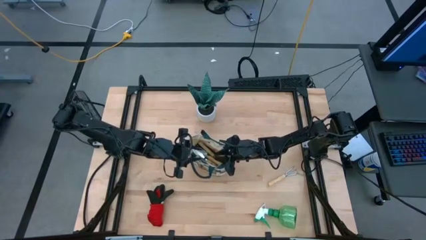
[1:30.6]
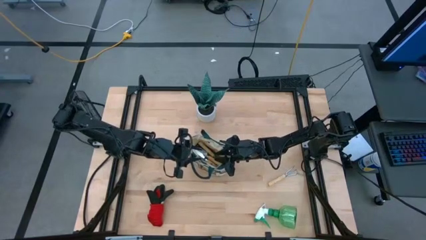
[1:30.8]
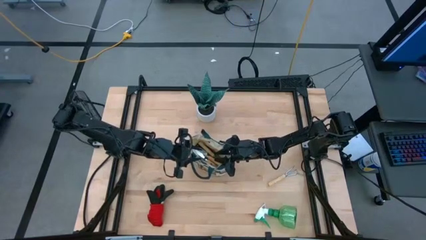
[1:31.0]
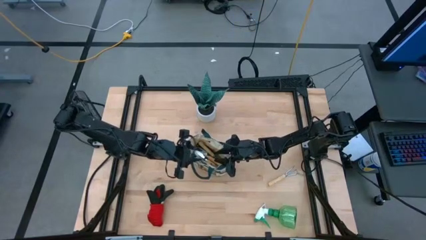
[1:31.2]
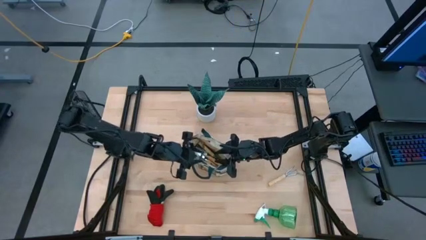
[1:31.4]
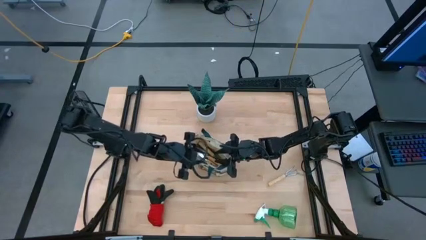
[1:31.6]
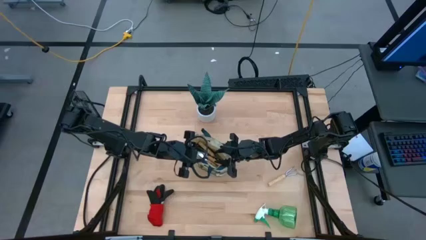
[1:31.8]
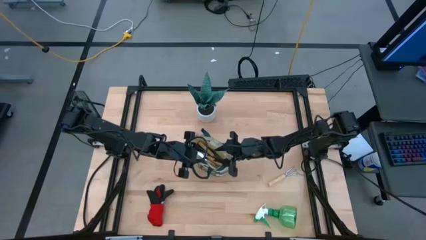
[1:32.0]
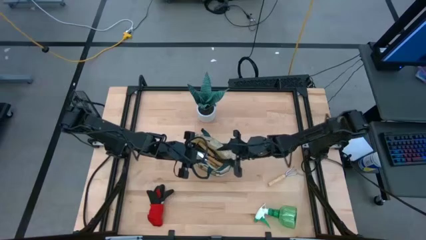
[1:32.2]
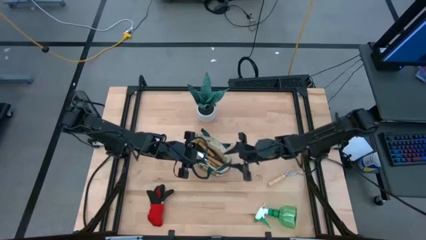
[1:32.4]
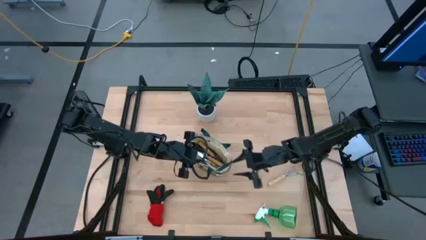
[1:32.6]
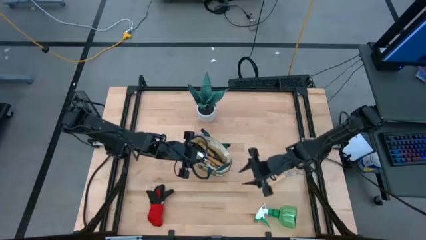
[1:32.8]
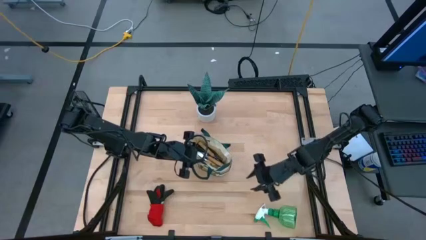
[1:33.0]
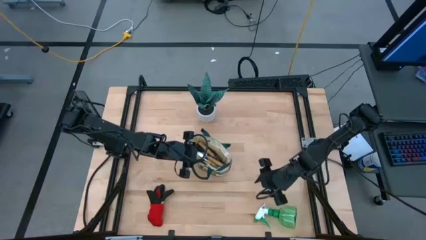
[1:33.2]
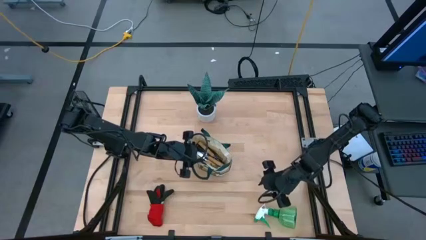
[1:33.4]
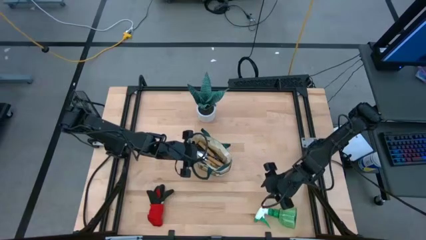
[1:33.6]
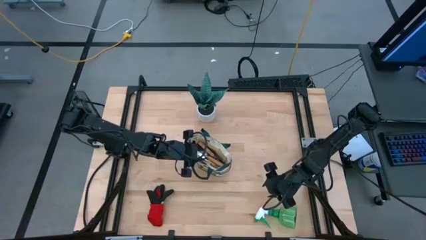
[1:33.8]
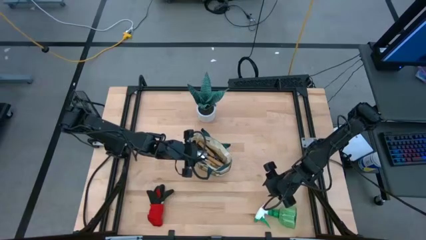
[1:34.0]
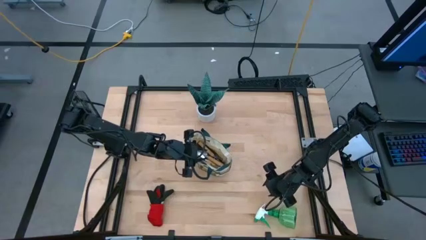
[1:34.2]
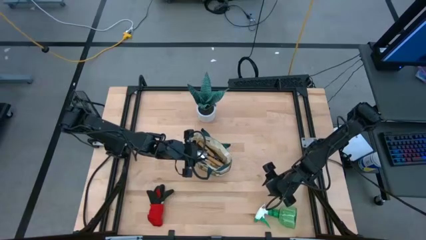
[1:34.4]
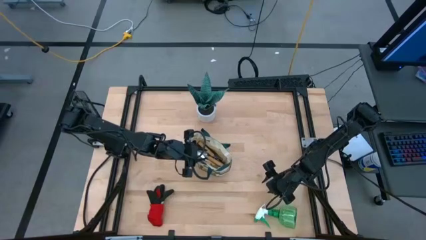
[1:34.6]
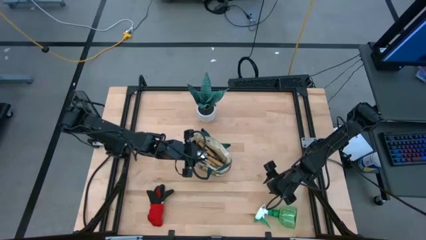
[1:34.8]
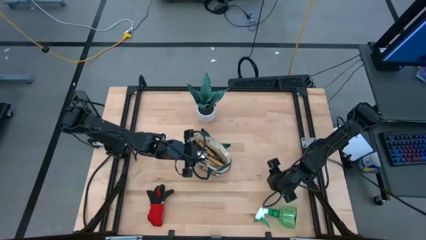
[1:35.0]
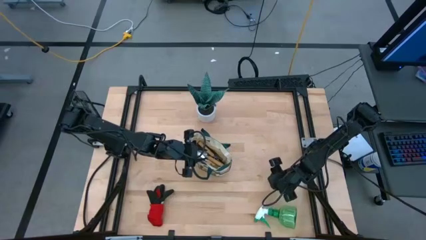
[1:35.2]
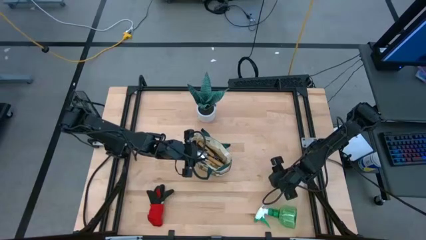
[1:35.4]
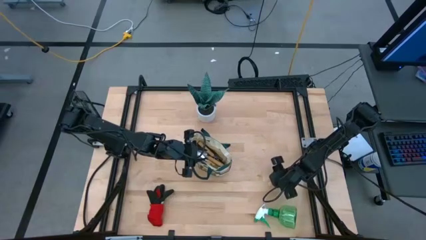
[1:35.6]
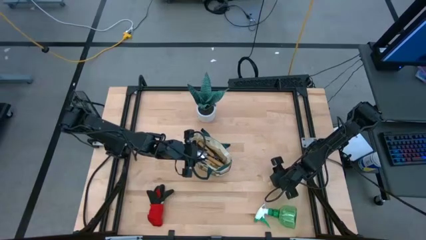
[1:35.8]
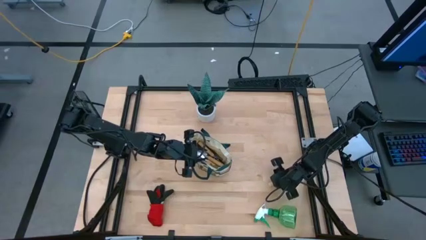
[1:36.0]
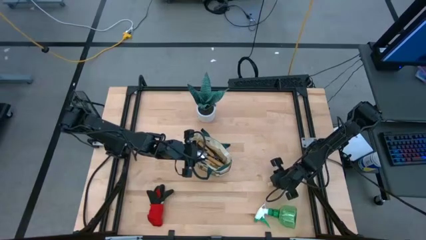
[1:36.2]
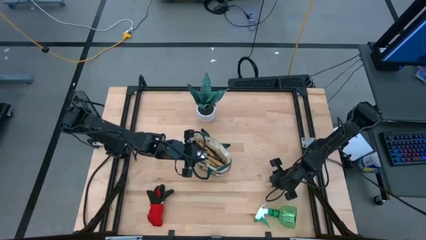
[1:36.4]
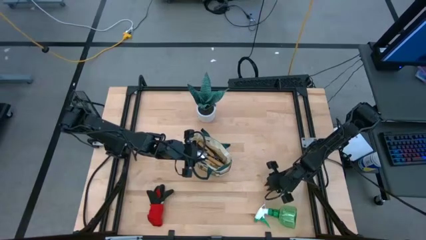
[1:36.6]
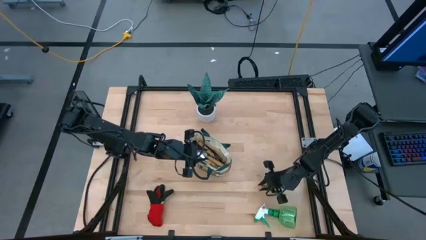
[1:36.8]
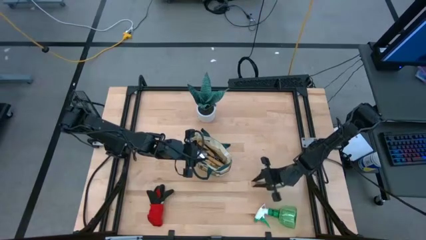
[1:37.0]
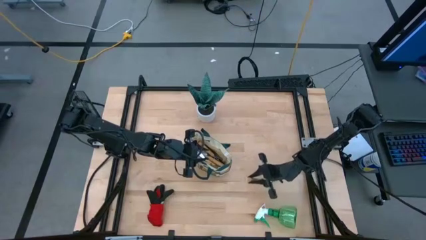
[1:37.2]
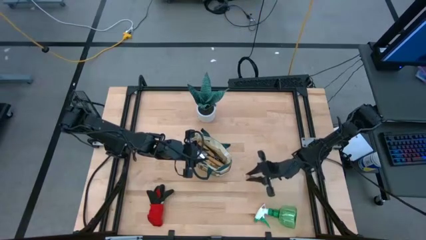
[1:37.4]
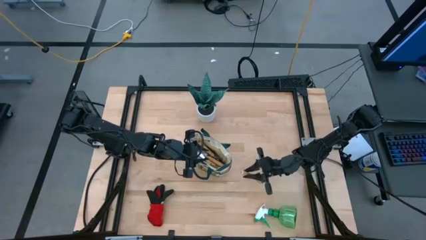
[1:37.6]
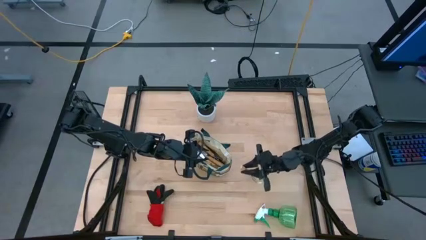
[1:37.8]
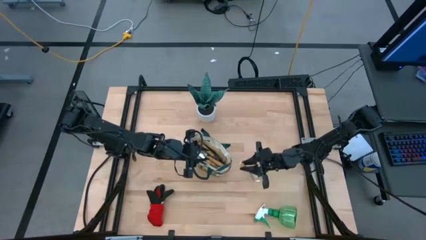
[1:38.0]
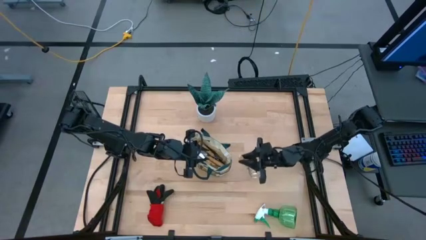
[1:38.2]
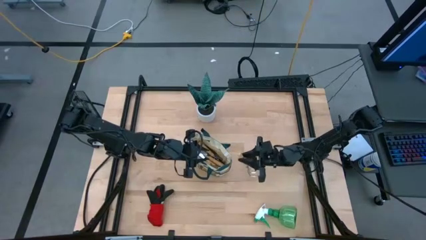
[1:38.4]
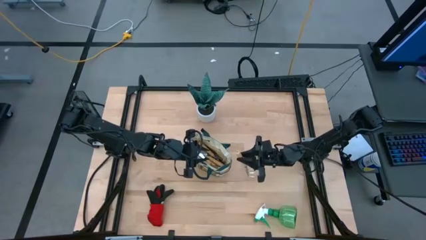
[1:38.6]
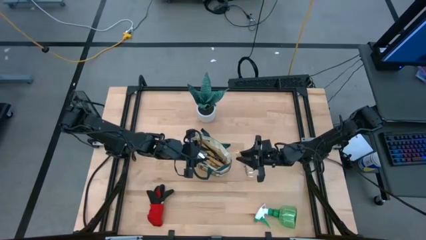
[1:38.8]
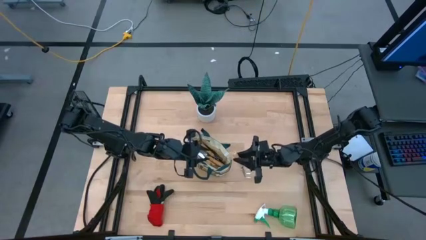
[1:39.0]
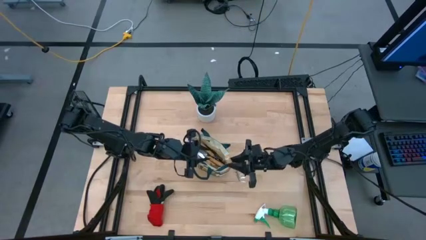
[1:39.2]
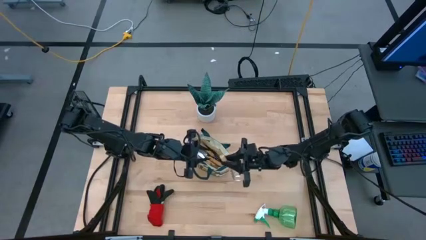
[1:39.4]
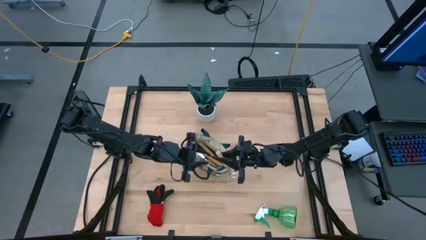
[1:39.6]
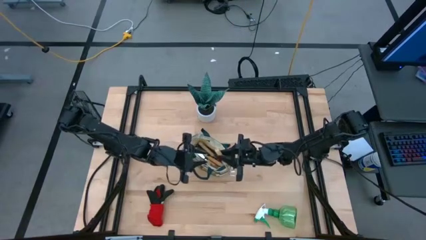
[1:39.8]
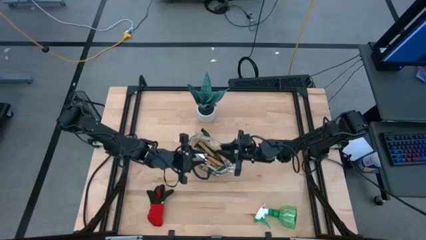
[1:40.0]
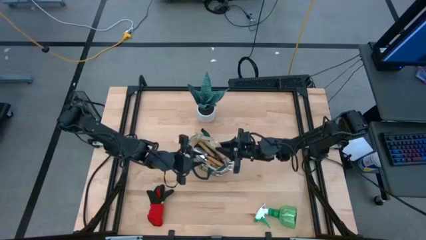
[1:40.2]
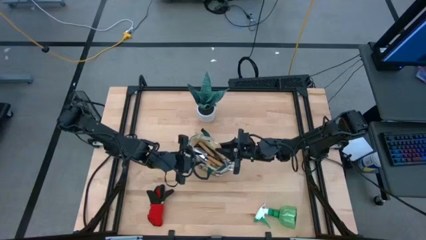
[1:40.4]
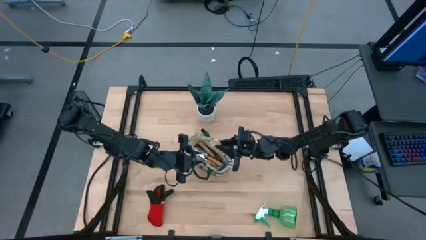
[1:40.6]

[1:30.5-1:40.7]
Task: Pick & Place Garden tools in Gardening bag
Put the hand rake into the gardening bag
